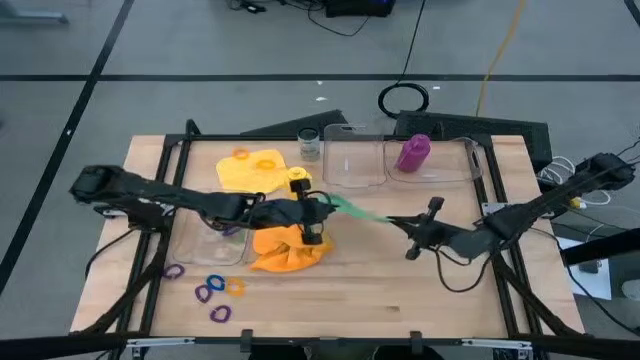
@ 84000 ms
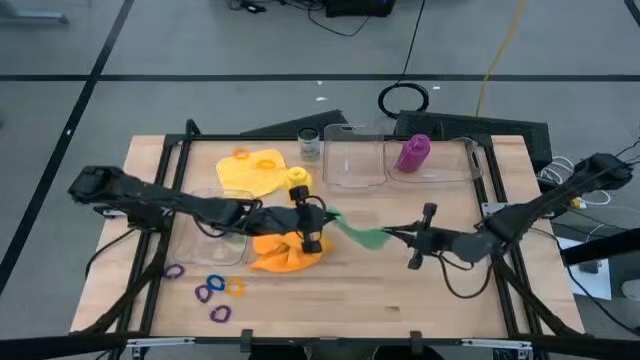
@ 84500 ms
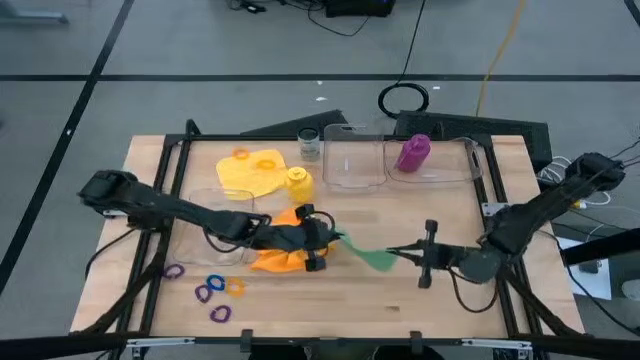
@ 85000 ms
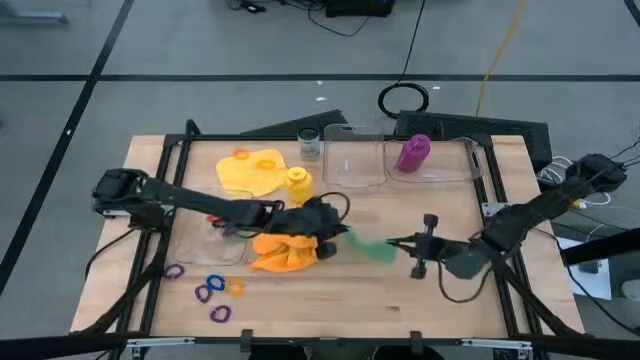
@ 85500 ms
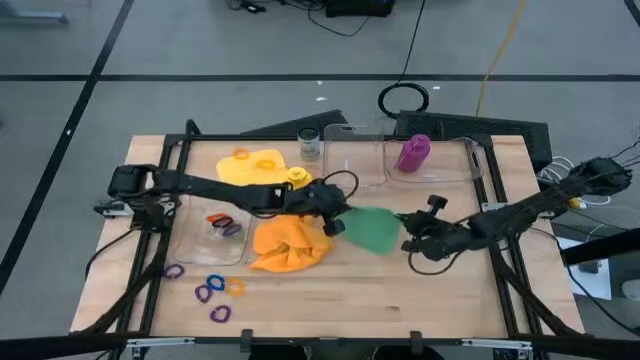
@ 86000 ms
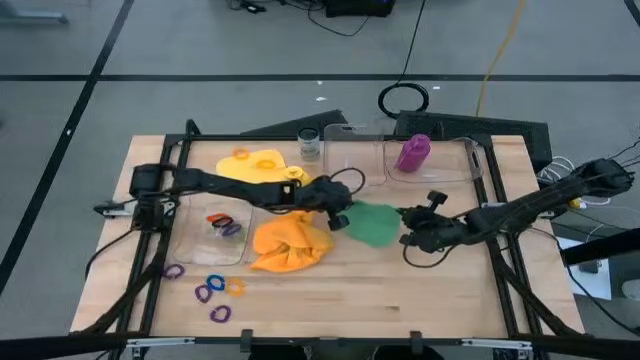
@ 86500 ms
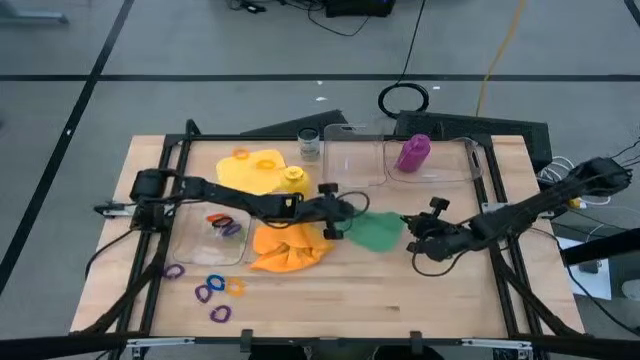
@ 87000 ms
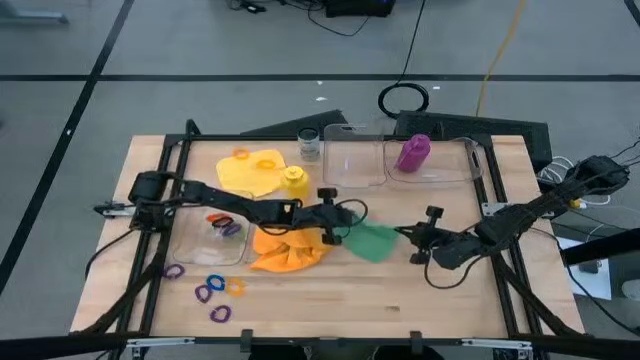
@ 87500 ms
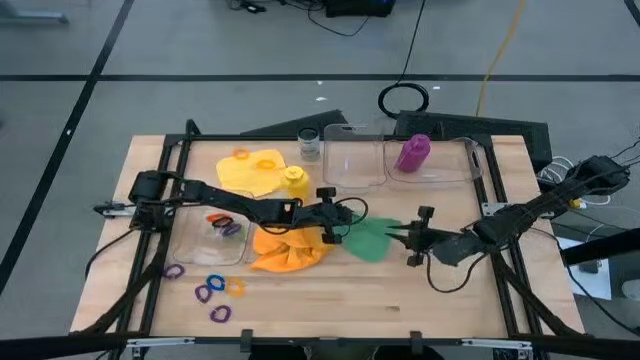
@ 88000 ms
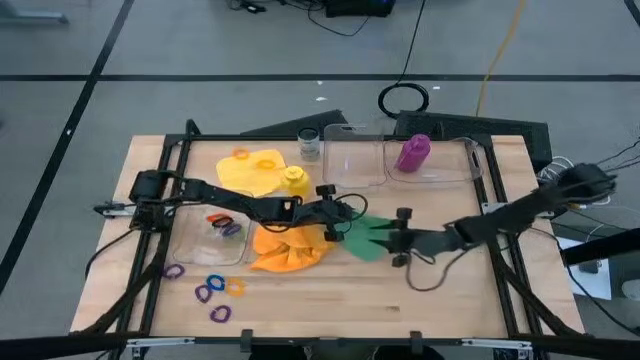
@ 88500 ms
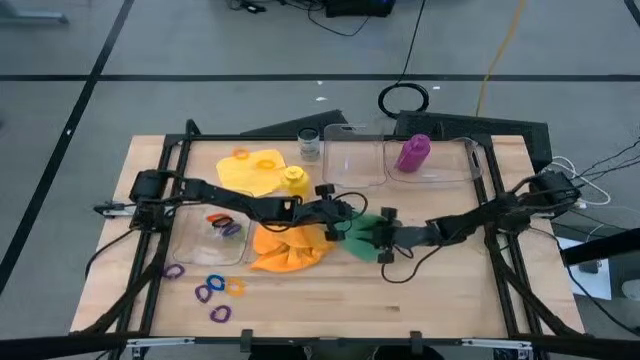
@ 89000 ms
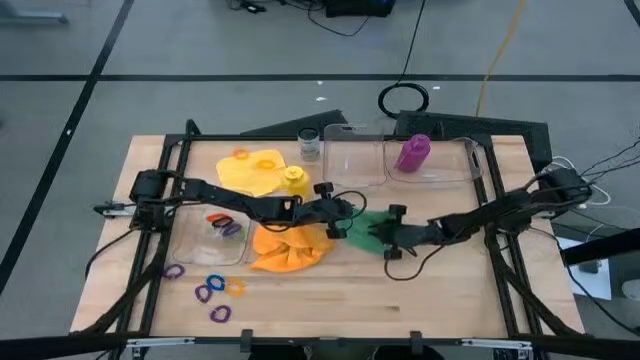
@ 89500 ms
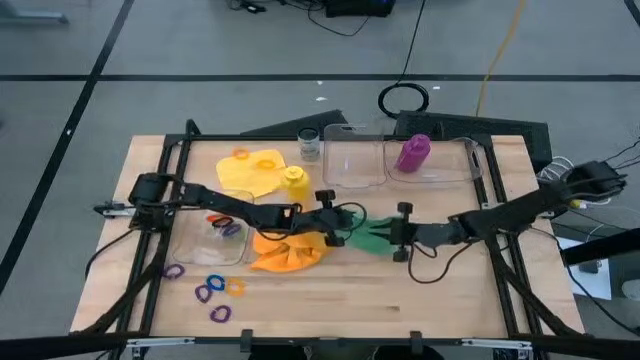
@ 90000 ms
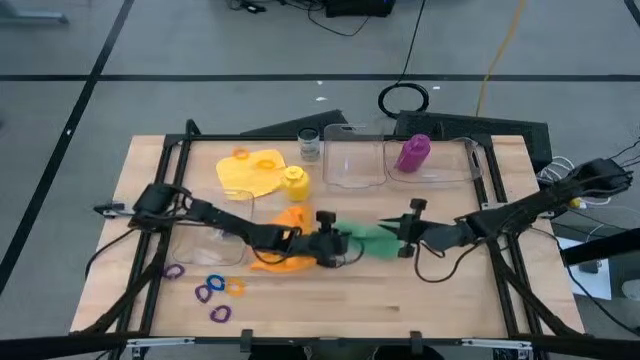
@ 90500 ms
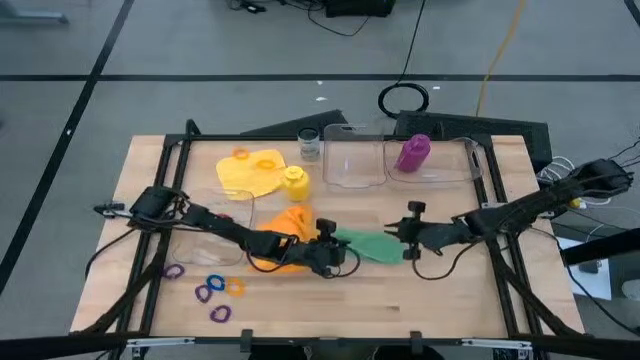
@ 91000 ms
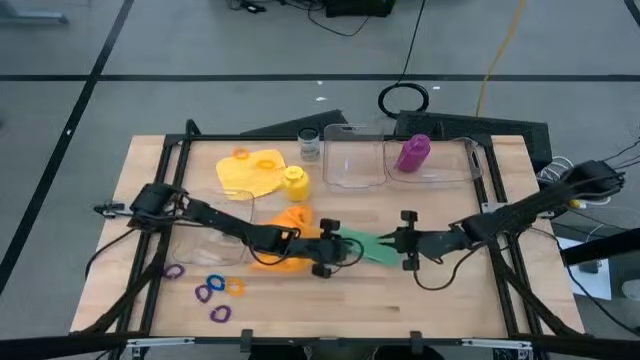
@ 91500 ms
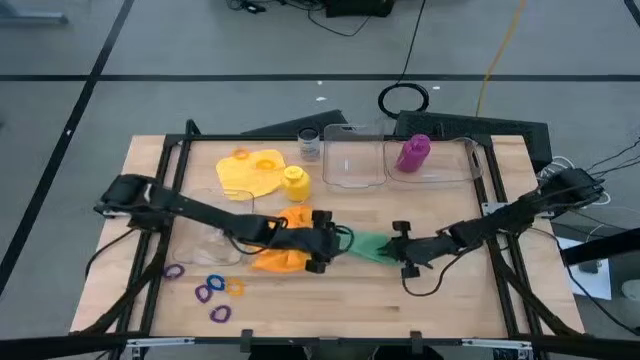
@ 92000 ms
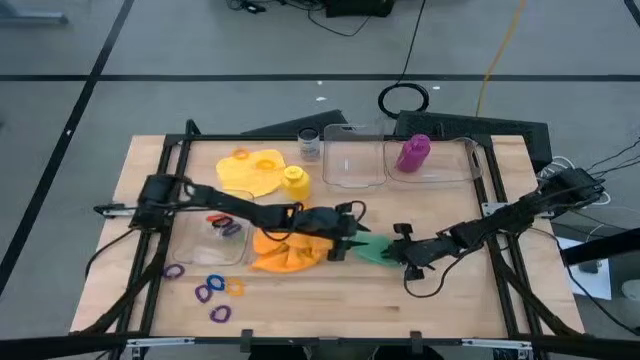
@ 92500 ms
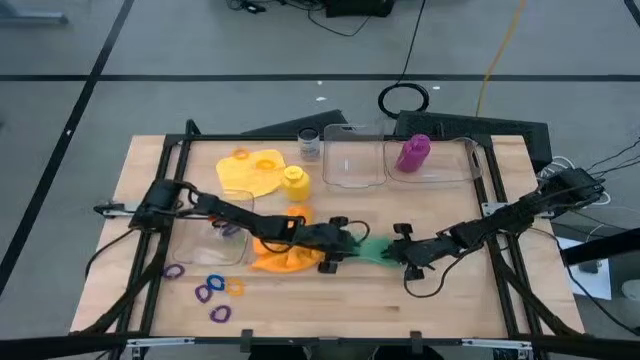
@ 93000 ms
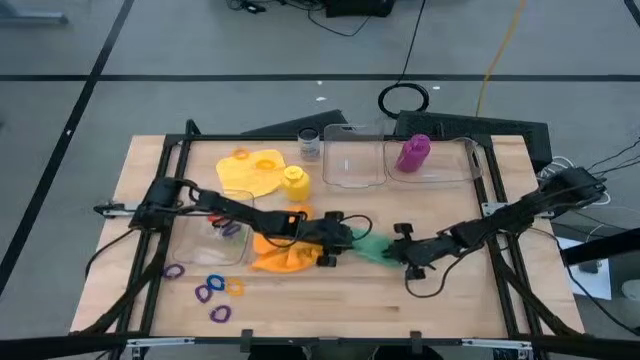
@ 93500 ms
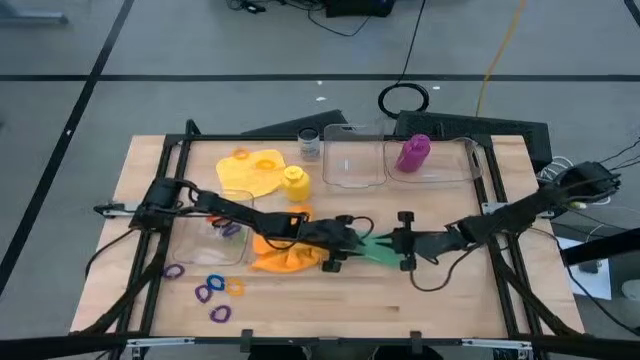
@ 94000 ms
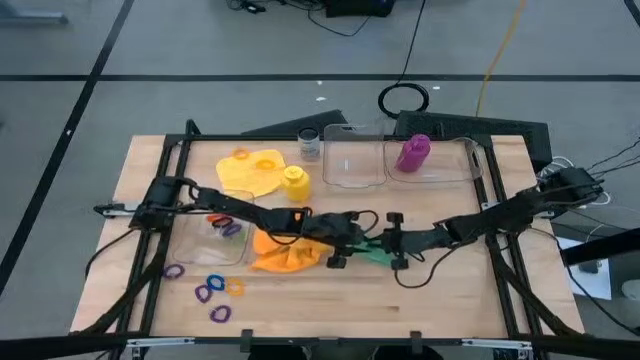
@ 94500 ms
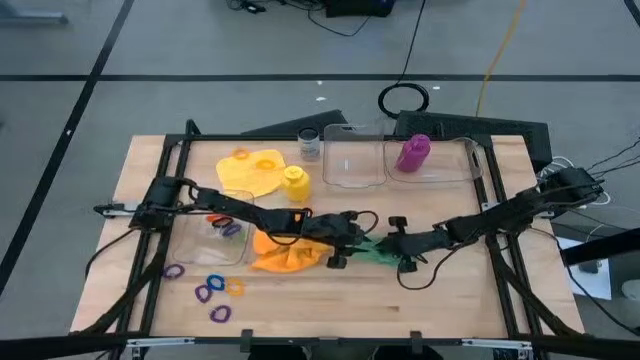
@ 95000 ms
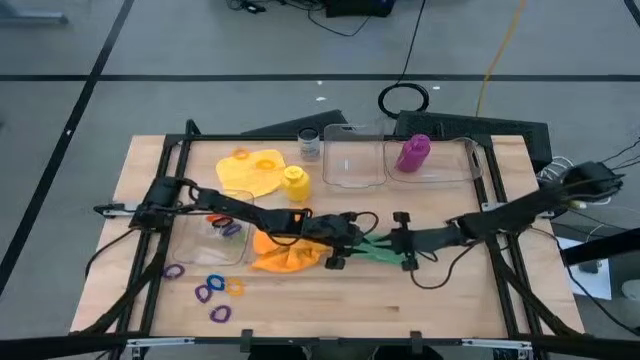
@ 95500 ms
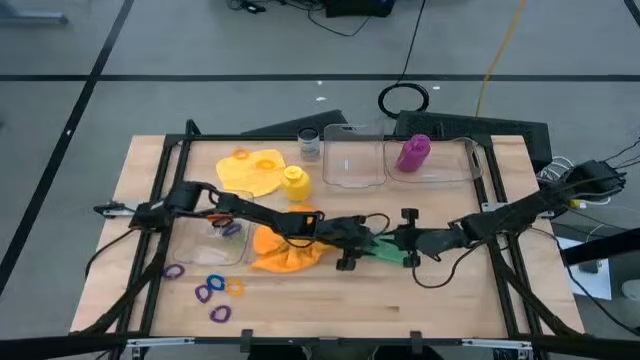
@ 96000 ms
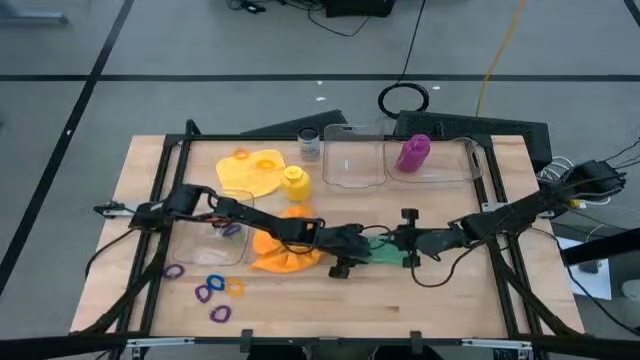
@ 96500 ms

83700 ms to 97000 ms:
Task: Pick & Place Sports Items
Fold the green towel

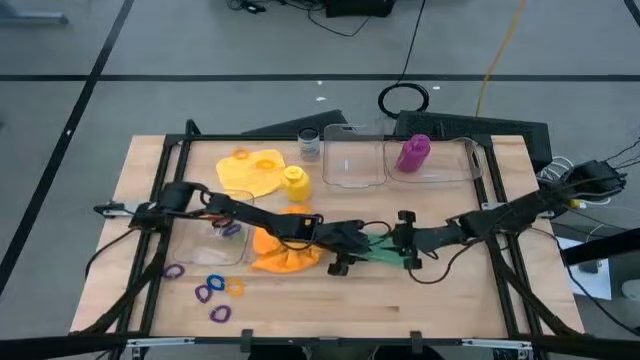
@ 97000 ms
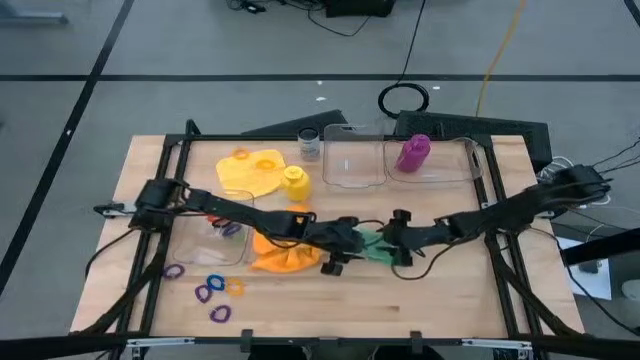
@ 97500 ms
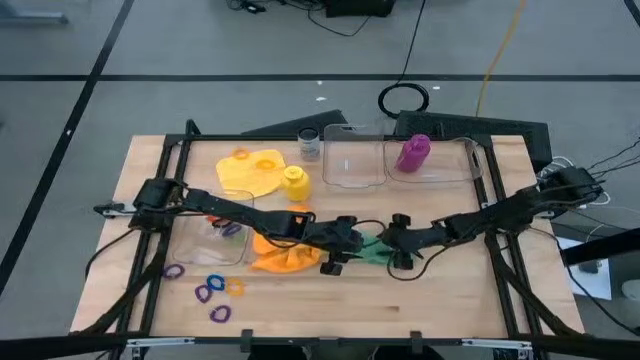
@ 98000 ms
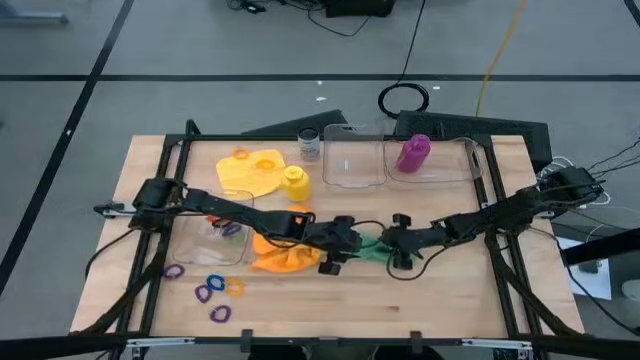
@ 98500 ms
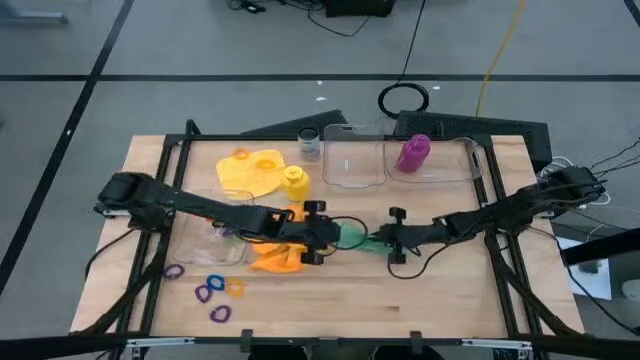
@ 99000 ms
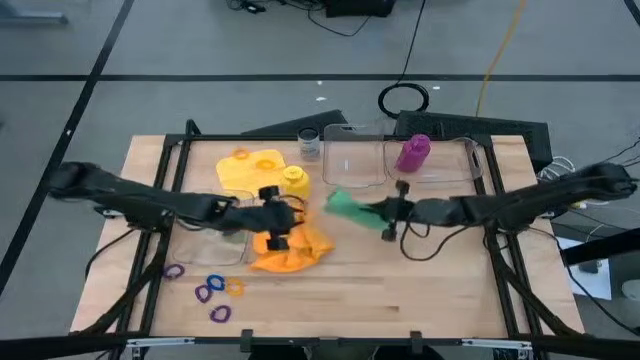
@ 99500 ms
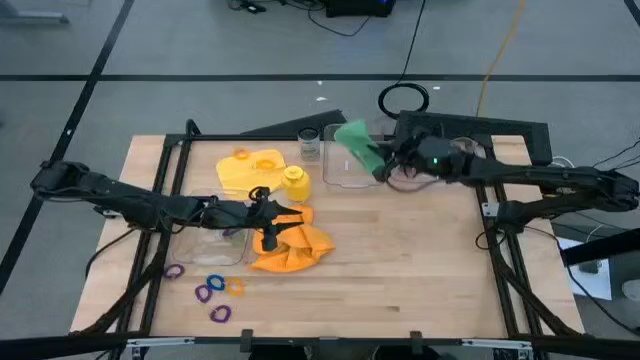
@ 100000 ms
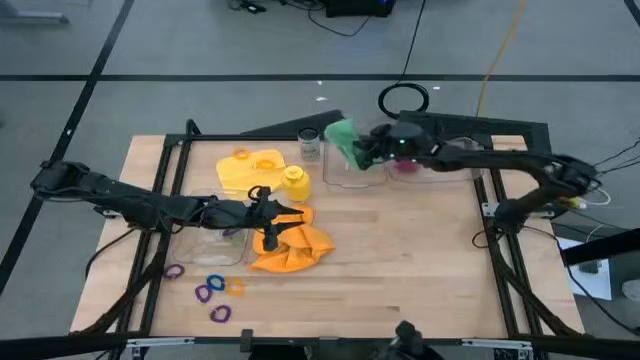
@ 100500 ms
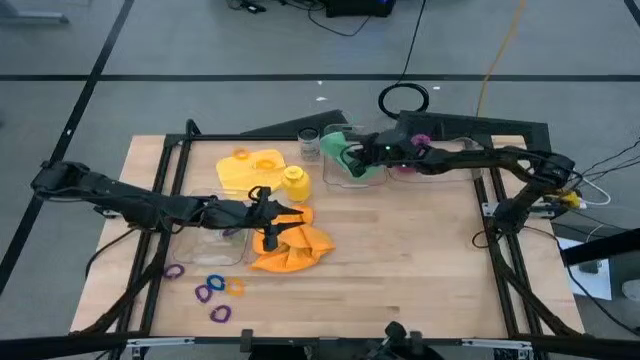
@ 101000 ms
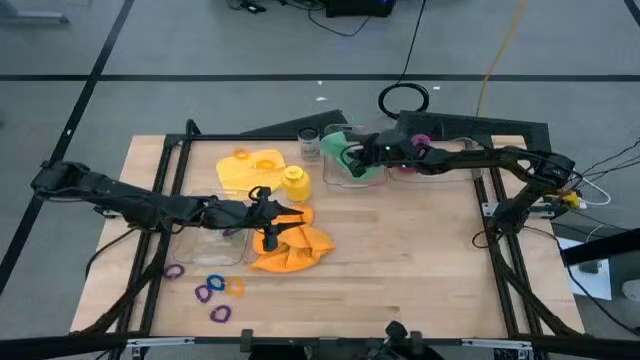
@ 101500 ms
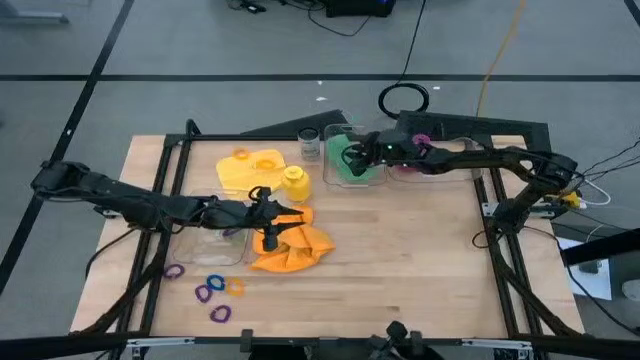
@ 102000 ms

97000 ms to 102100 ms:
Put the green towel into the top left transparent bin
